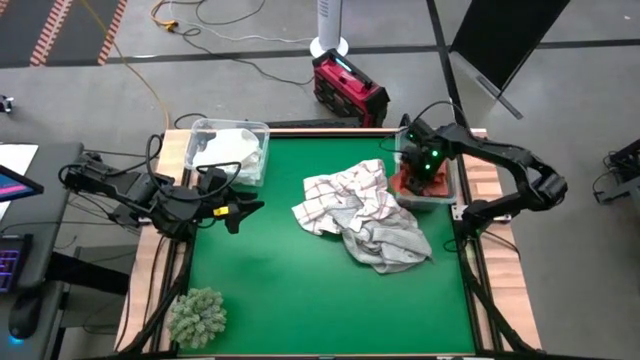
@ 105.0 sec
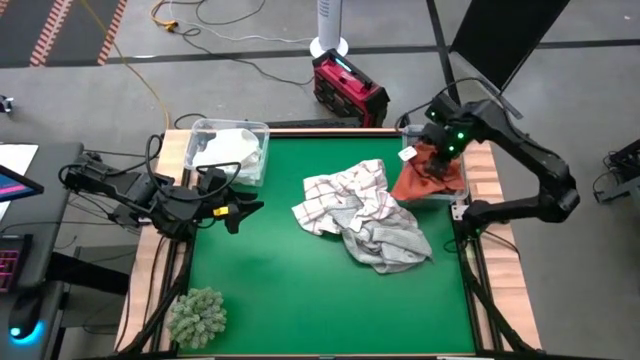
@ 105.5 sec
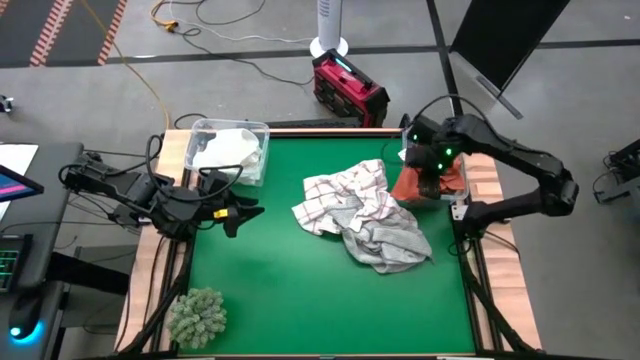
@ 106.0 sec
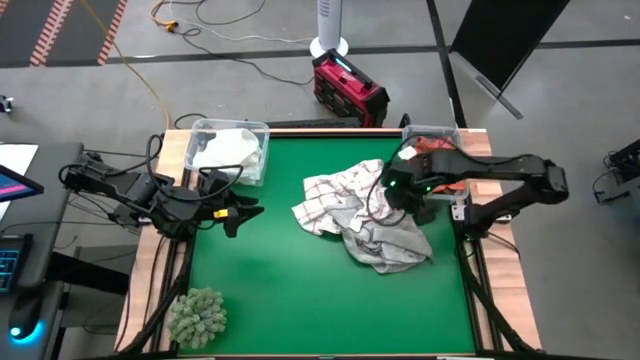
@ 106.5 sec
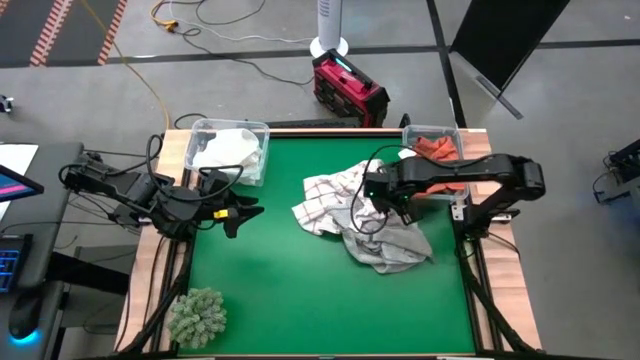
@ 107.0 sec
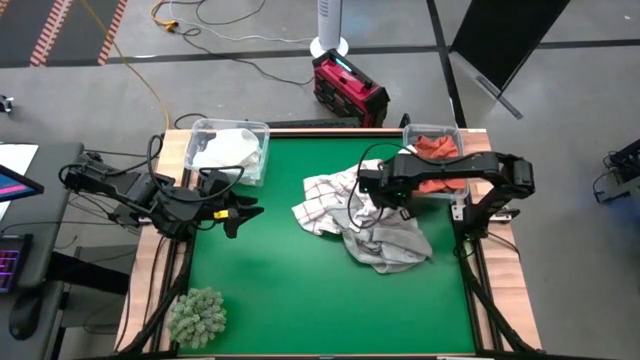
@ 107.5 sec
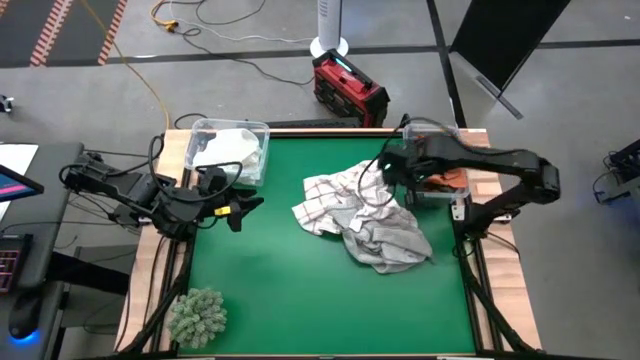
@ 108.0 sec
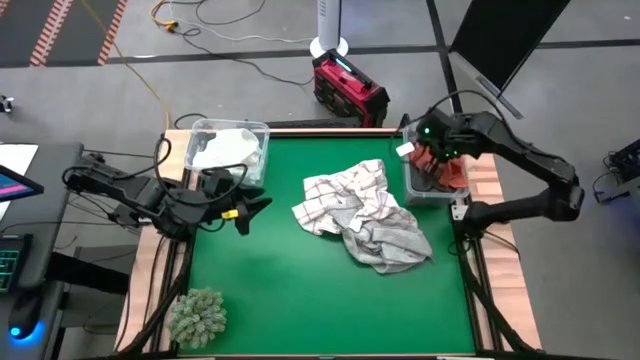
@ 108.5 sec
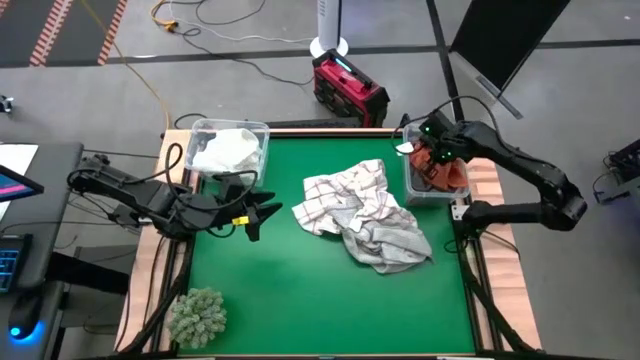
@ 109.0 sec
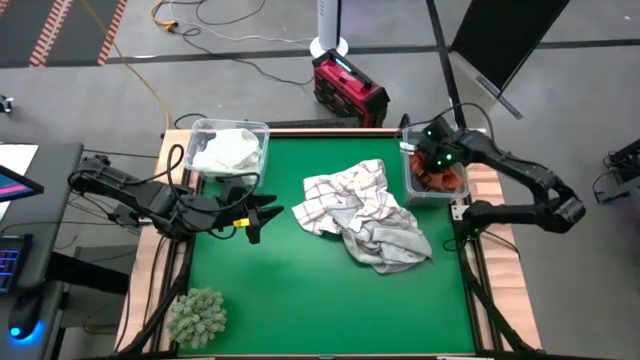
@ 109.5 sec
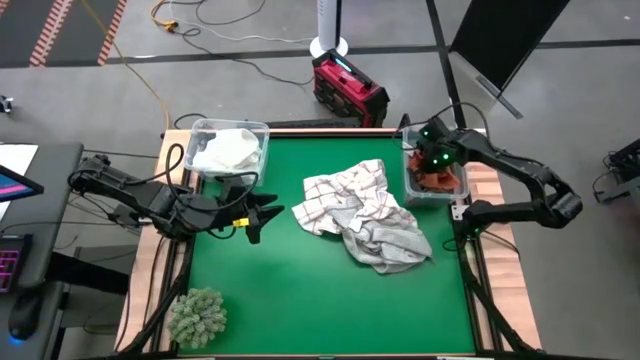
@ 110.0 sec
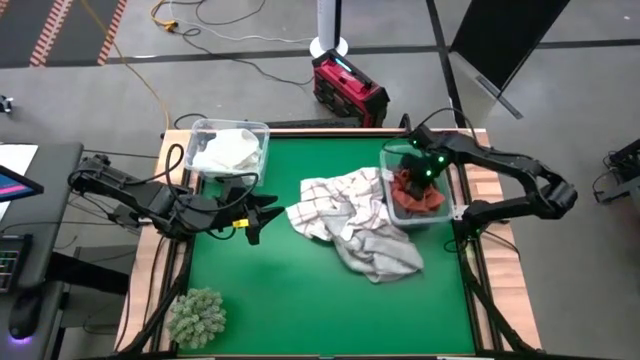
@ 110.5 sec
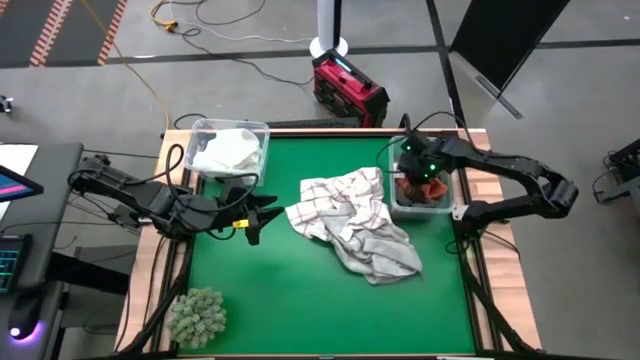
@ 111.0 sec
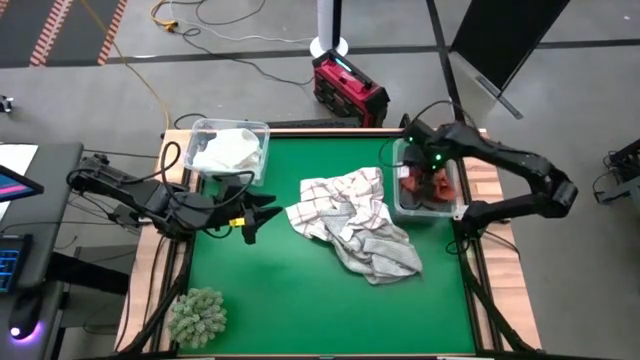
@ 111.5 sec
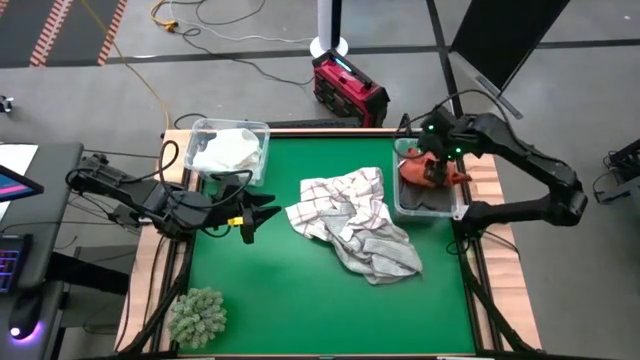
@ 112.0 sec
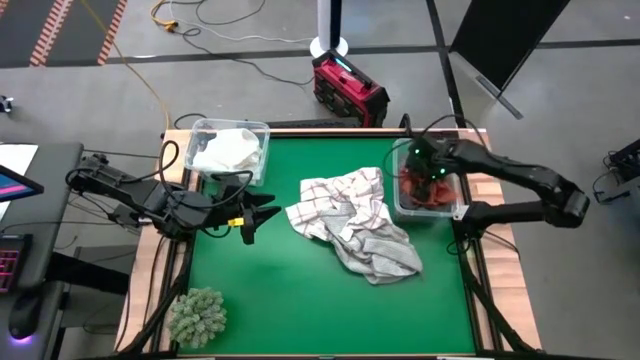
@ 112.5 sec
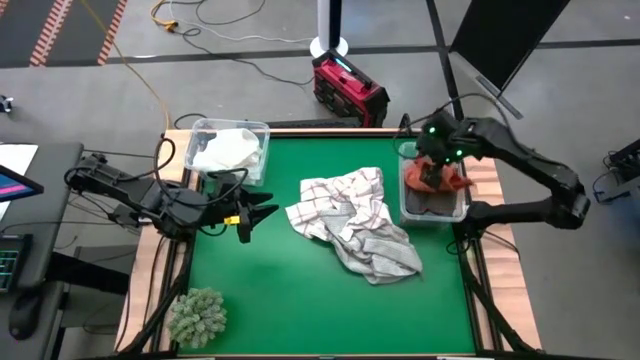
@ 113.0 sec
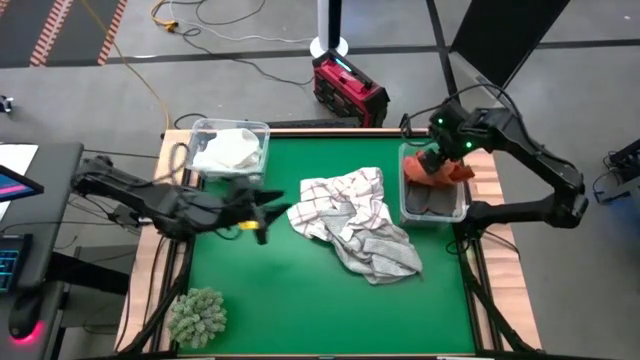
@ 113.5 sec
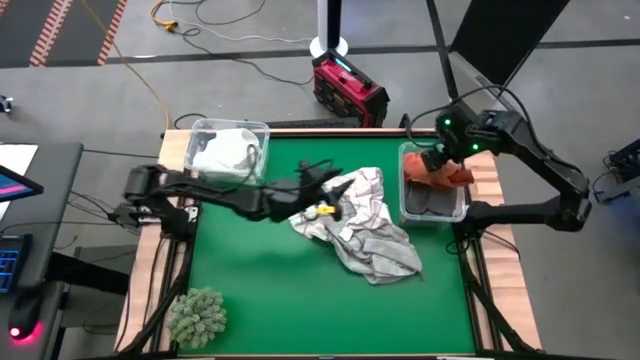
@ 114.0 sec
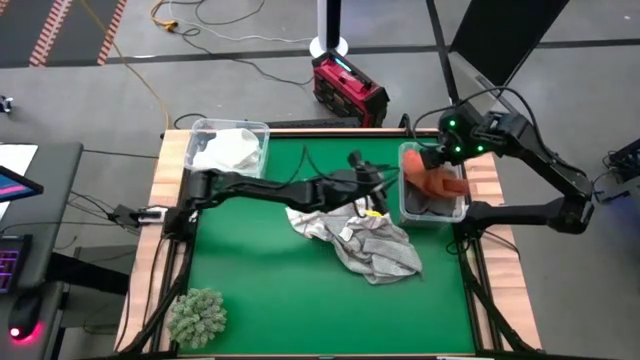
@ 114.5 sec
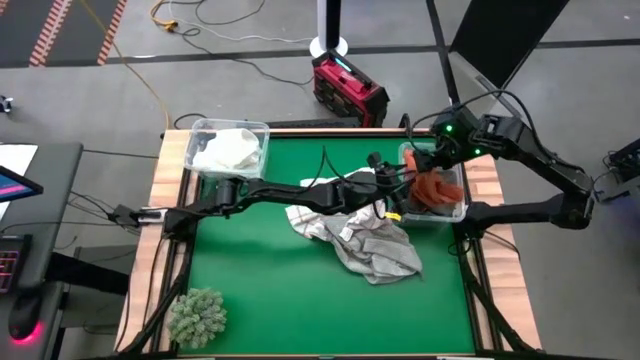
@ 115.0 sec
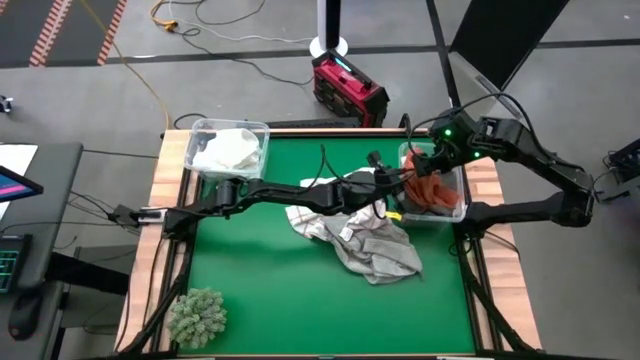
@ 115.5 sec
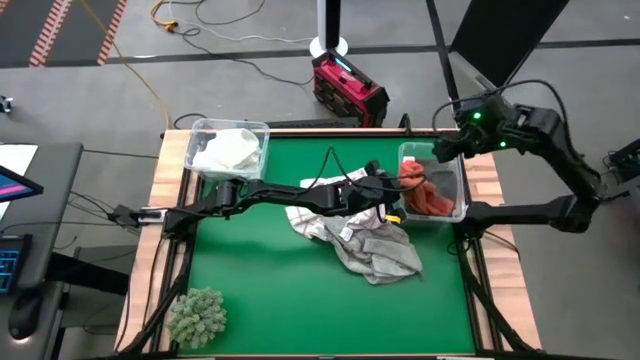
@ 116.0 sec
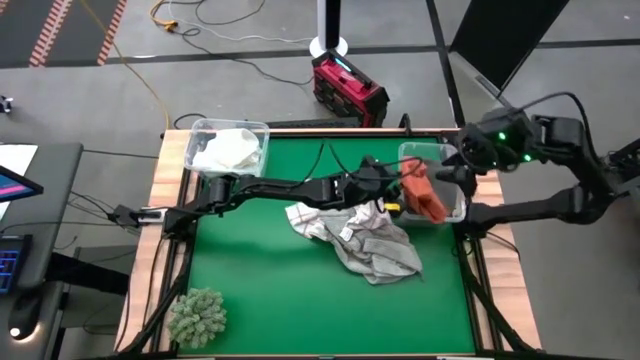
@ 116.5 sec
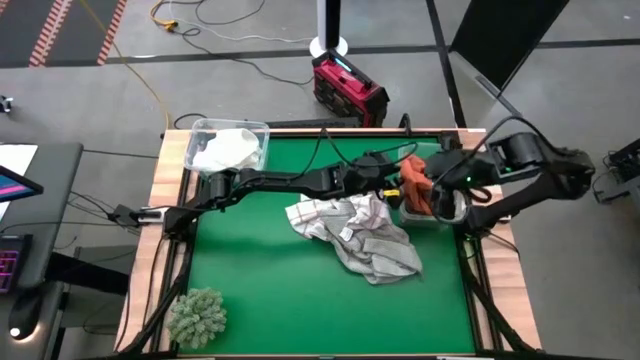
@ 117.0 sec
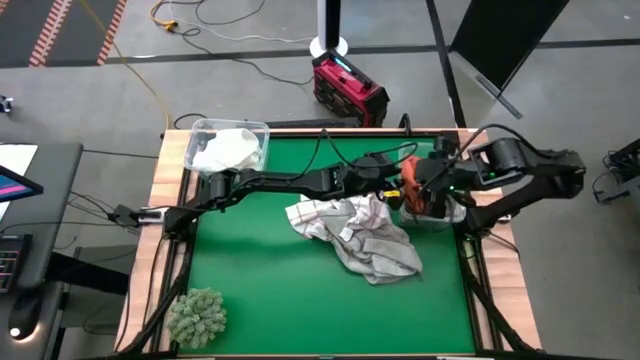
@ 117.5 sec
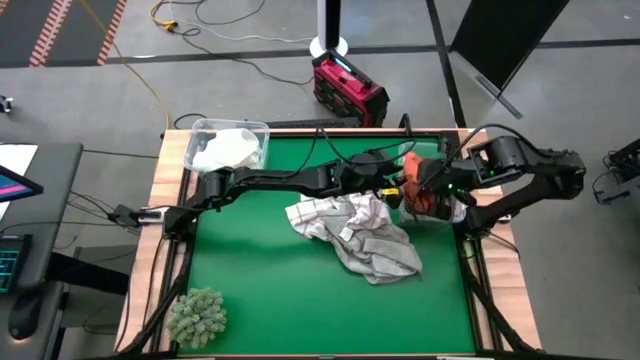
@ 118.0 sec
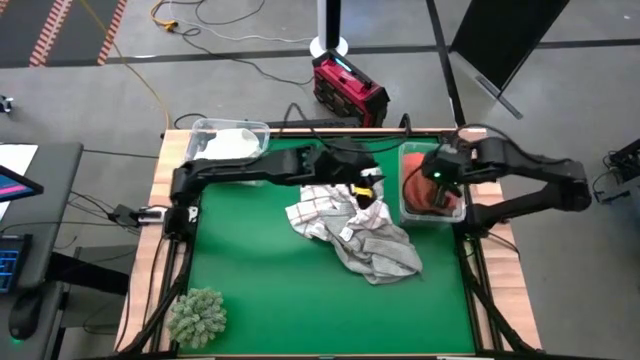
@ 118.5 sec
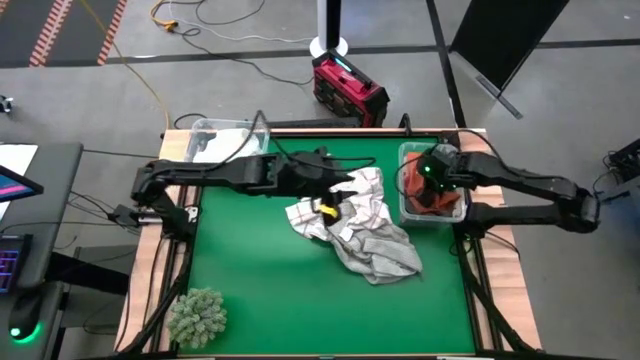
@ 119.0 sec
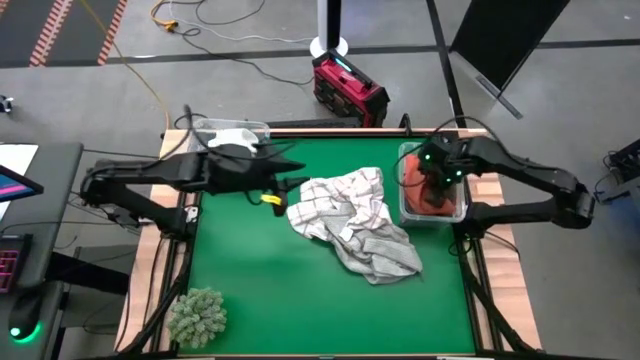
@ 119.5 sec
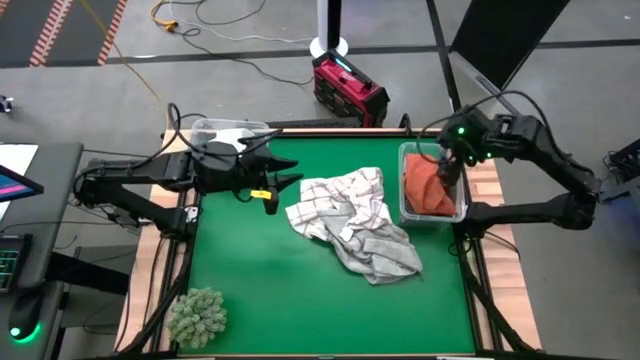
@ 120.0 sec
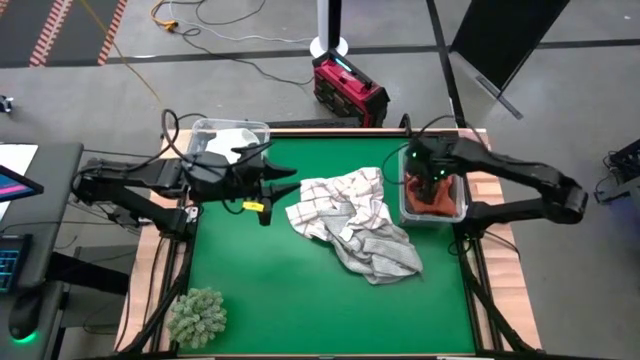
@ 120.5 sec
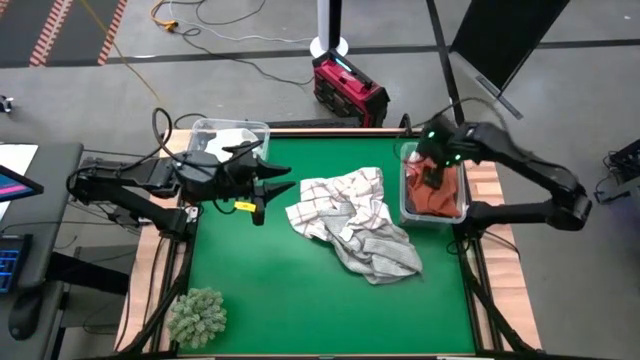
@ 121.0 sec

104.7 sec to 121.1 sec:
Task: Sort towels by color in basket
Put the orange towel into the right transparent bin

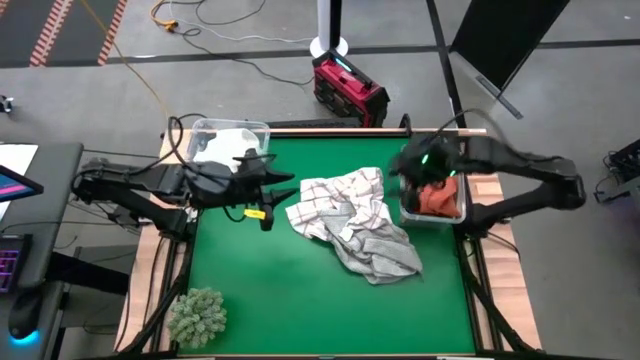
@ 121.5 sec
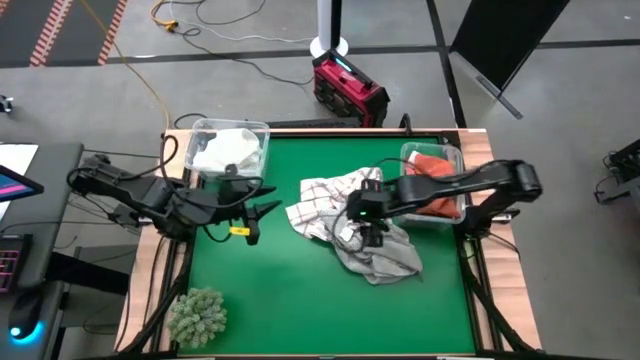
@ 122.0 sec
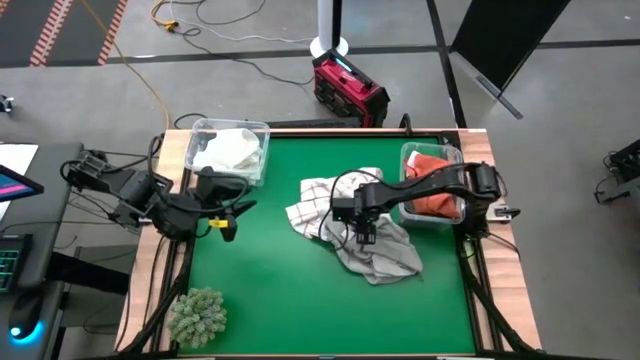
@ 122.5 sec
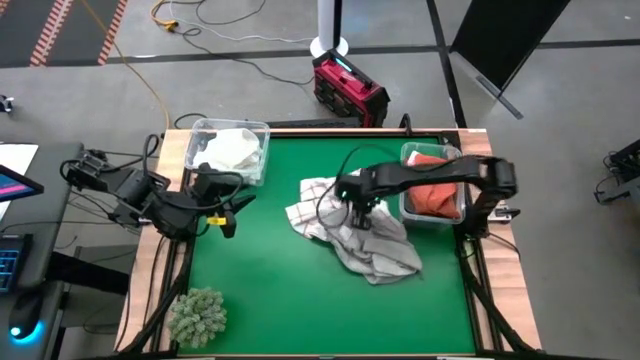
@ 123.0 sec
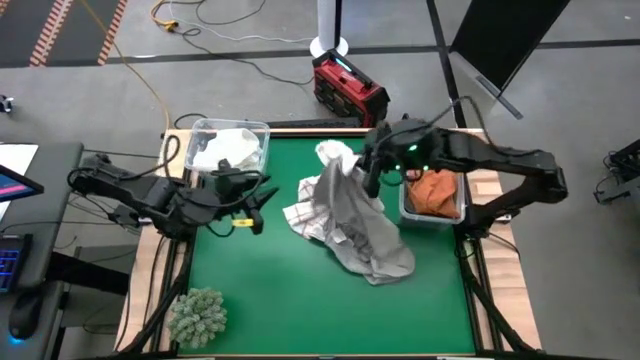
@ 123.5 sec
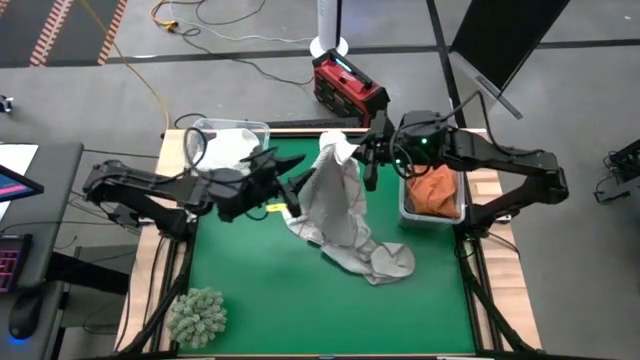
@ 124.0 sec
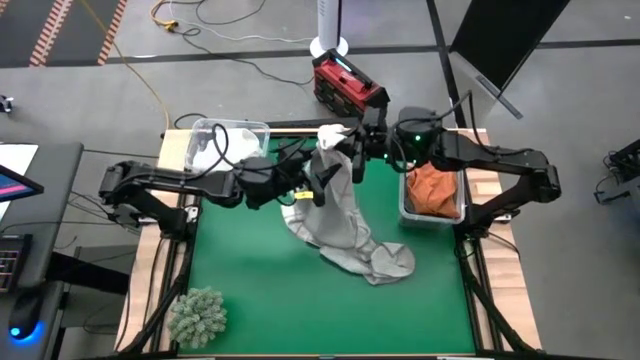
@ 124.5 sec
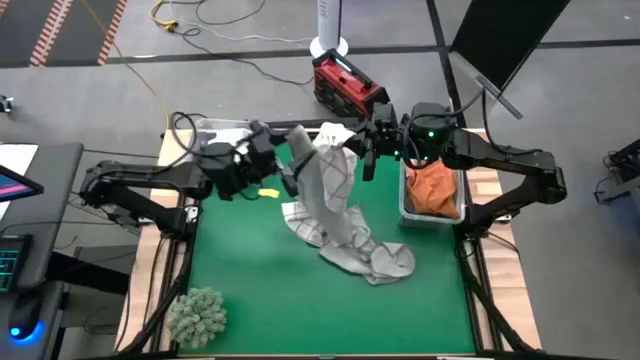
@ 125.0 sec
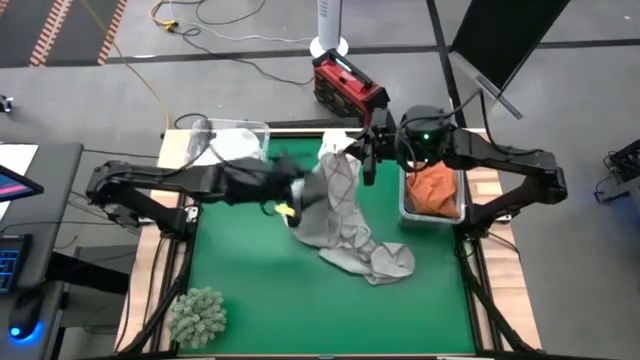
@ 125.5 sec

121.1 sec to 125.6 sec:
Put the white patterned towel into the left transparent bin
